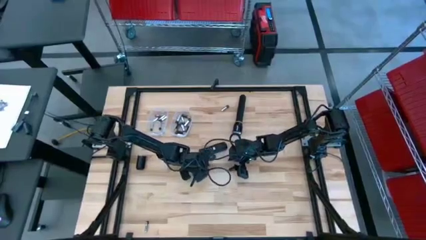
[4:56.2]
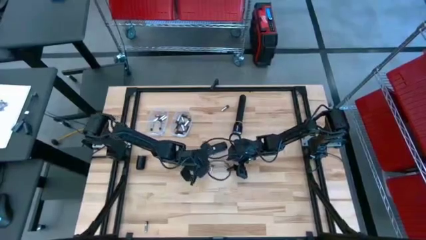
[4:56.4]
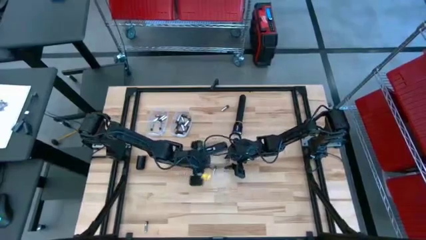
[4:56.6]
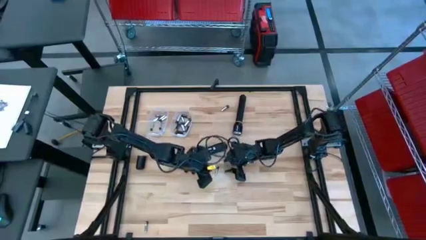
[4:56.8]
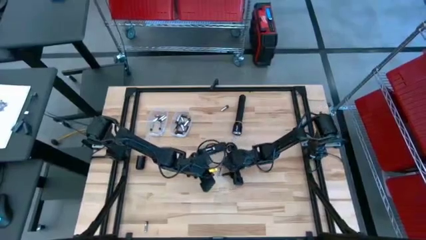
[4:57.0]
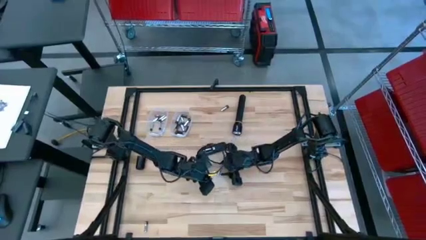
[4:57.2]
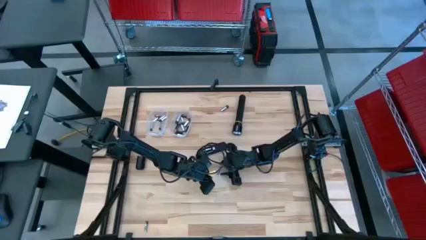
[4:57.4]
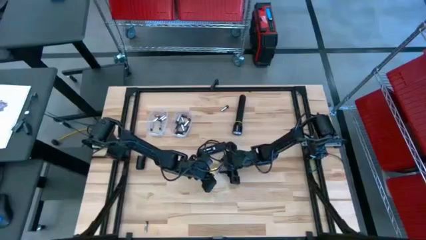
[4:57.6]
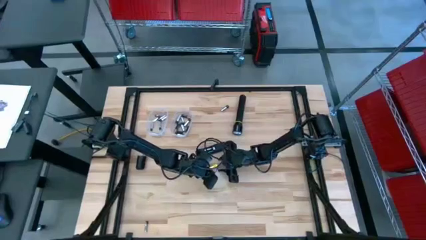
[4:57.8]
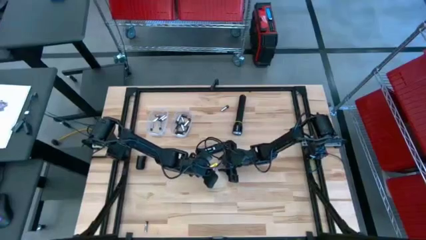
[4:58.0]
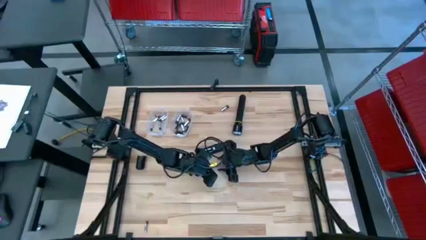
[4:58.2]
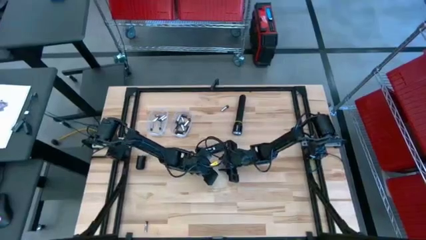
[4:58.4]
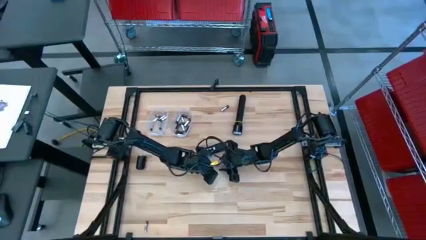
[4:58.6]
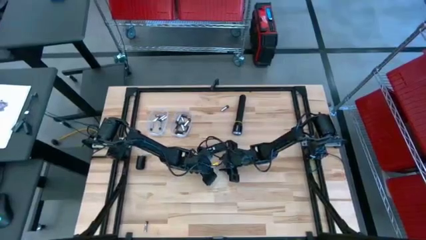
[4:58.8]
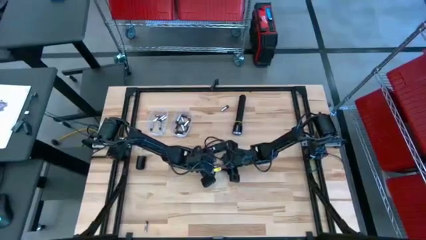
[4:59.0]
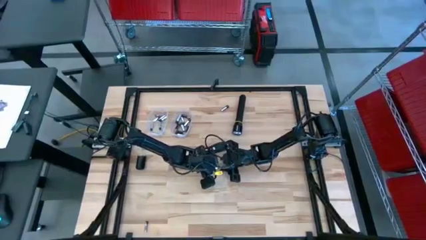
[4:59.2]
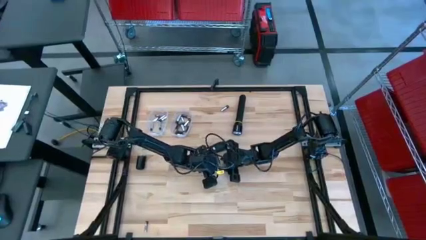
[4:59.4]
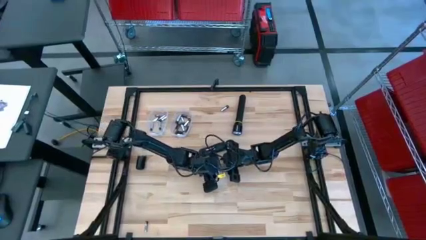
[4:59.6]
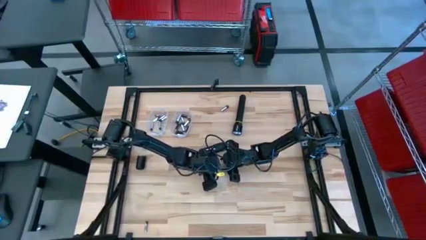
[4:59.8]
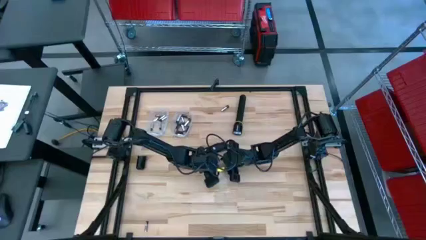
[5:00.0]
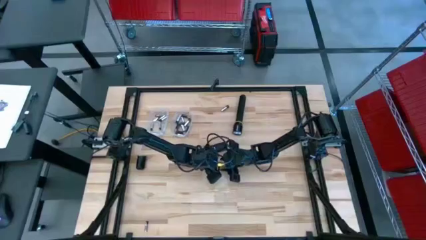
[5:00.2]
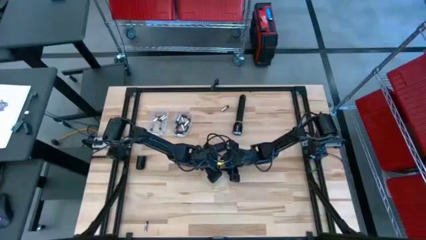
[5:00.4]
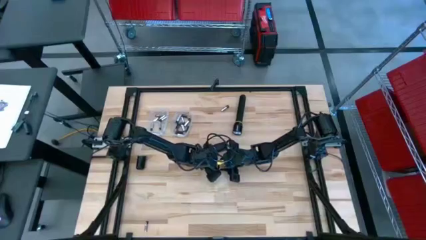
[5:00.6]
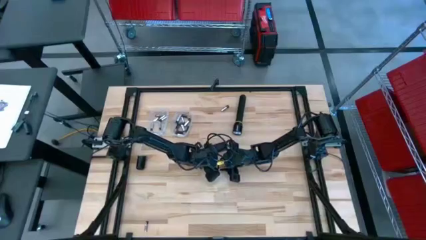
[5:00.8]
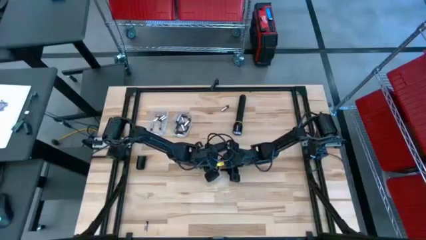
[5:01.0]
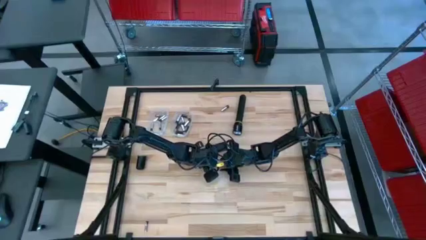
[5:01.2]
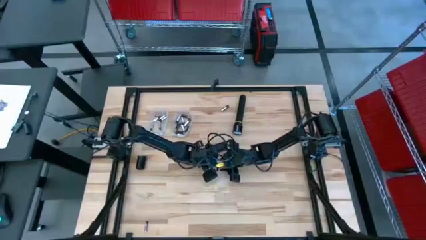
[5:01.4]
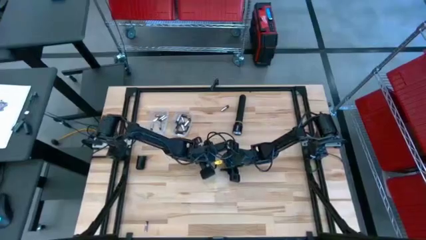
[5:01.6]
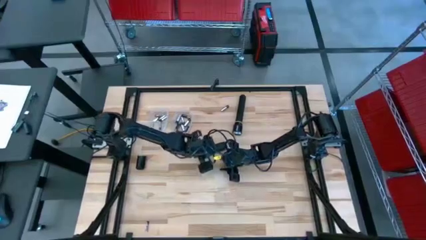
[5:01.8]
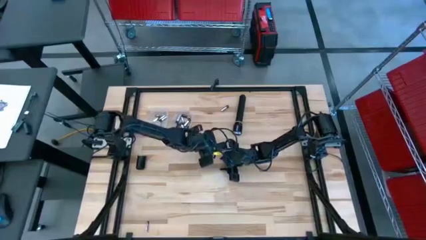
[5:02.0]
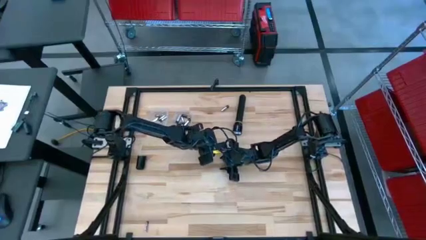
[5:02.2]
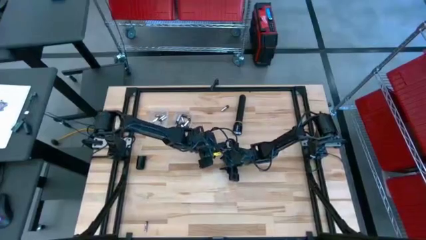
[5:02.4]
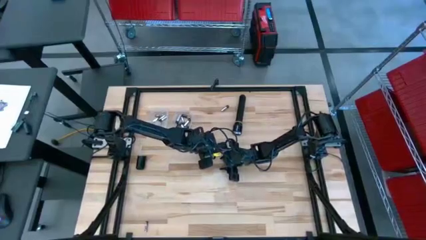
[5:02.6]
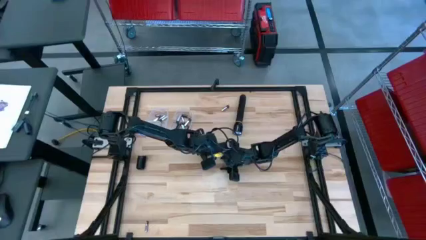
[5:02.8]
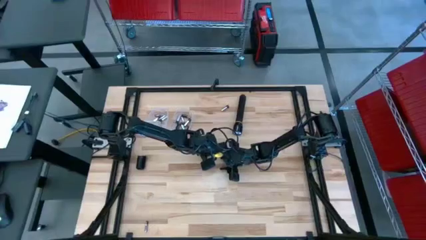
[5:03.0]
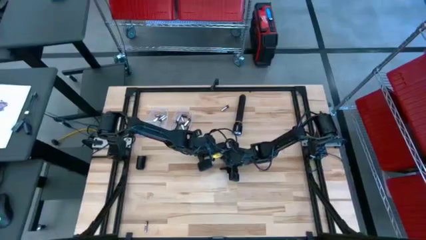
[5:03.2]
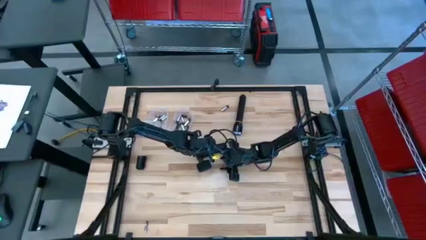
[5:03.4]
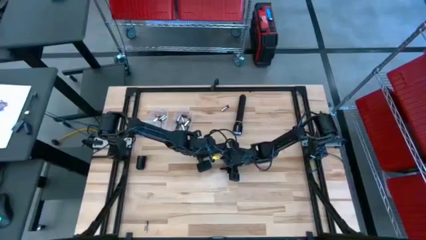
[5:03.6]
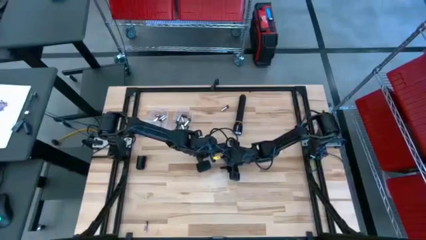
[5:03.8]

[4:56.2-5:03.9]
Task: Insert battery
Insert the silver battery into the remote control battery compartment

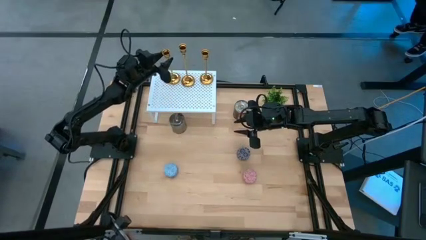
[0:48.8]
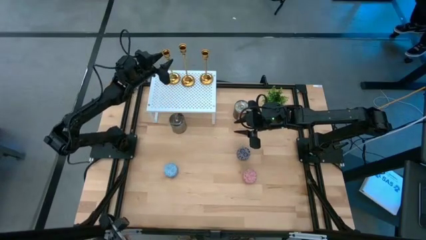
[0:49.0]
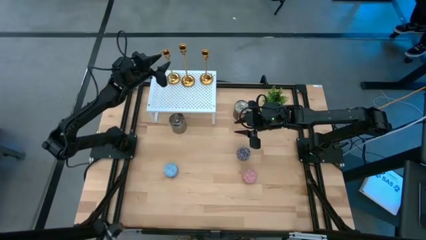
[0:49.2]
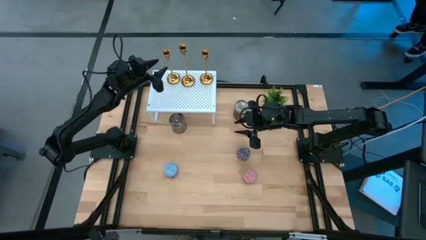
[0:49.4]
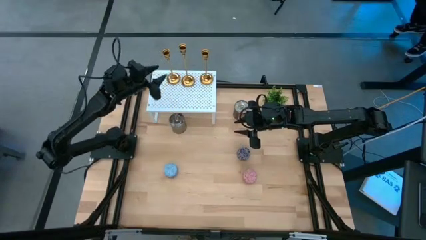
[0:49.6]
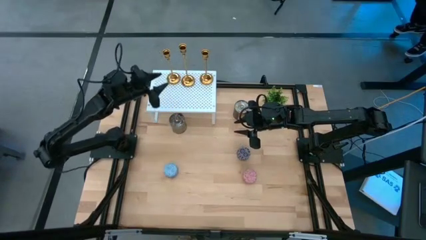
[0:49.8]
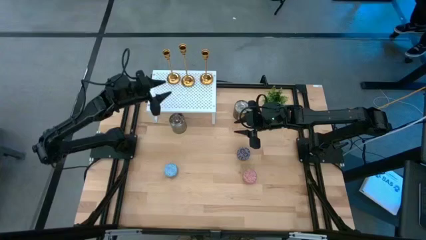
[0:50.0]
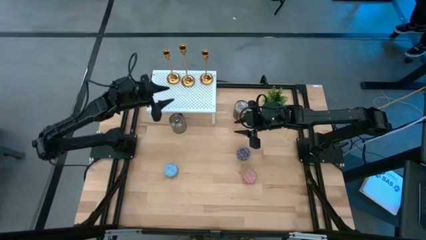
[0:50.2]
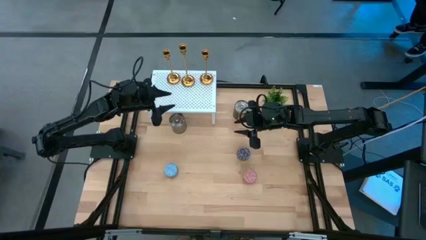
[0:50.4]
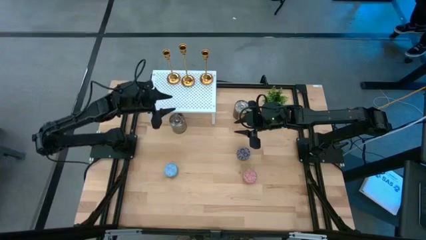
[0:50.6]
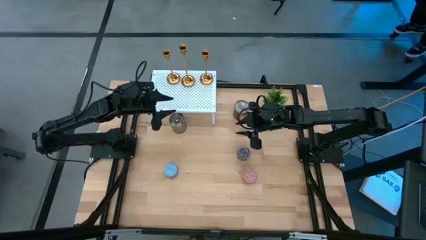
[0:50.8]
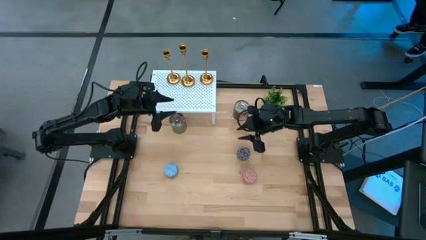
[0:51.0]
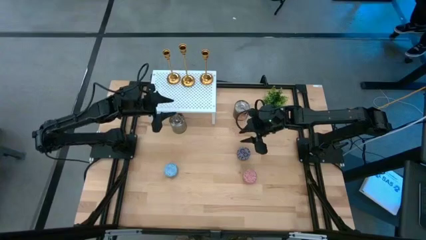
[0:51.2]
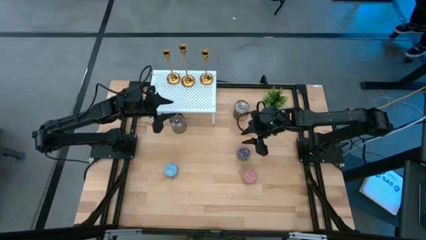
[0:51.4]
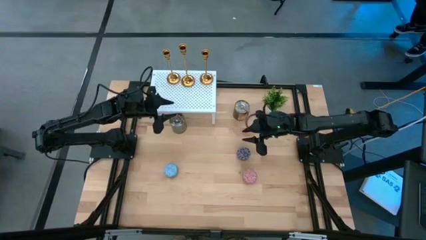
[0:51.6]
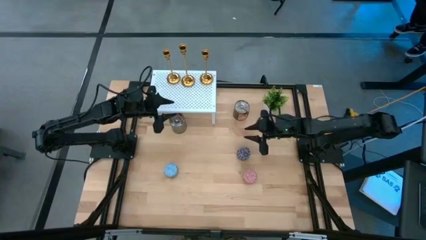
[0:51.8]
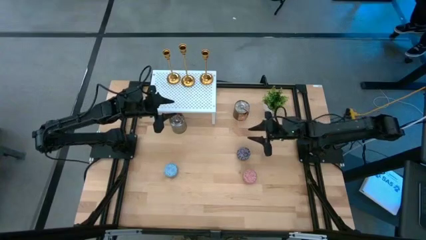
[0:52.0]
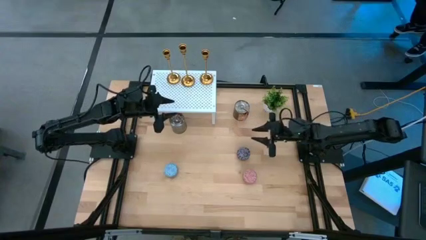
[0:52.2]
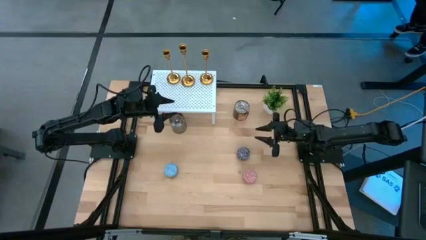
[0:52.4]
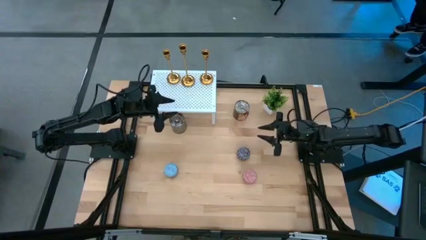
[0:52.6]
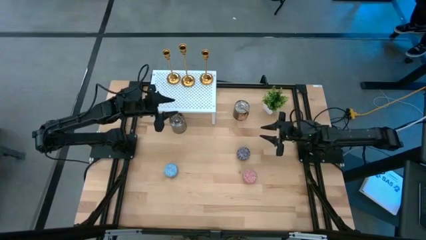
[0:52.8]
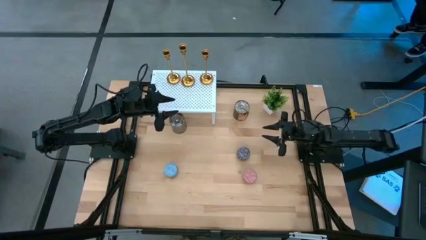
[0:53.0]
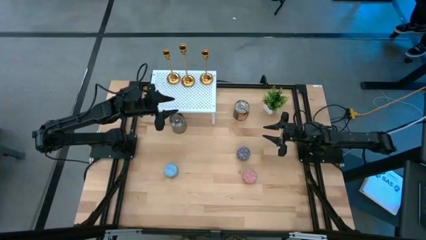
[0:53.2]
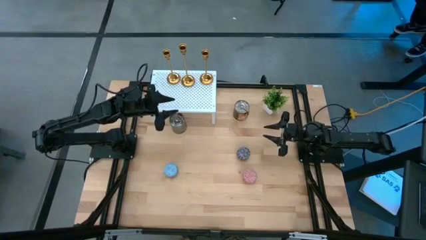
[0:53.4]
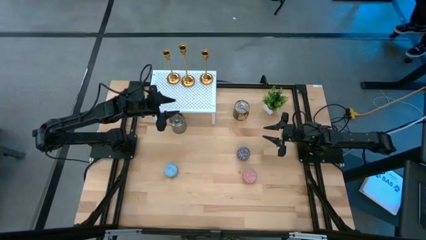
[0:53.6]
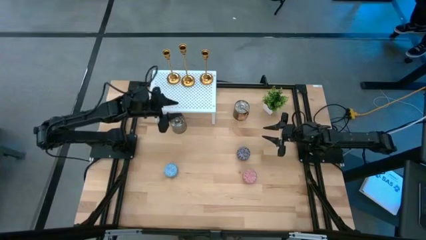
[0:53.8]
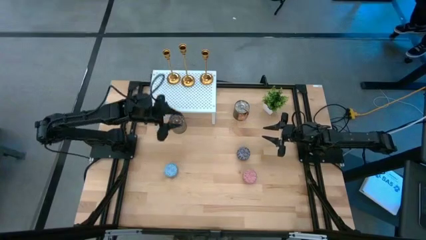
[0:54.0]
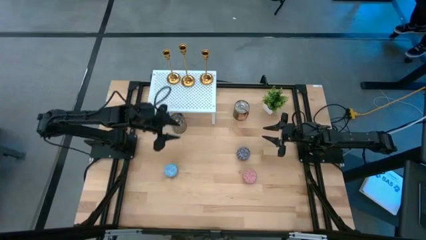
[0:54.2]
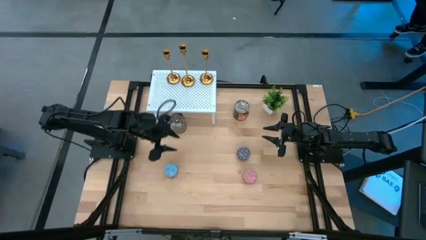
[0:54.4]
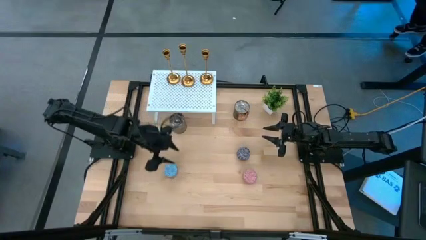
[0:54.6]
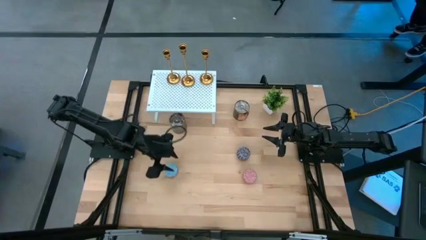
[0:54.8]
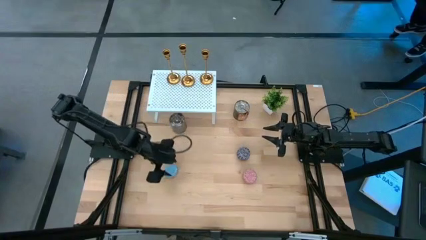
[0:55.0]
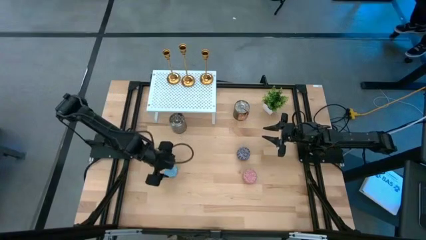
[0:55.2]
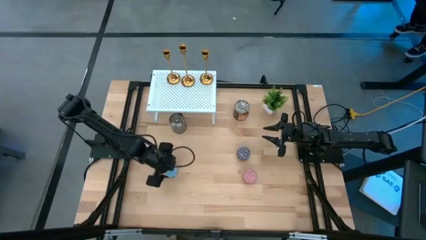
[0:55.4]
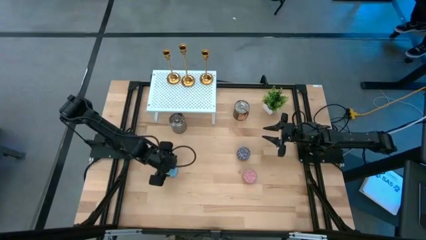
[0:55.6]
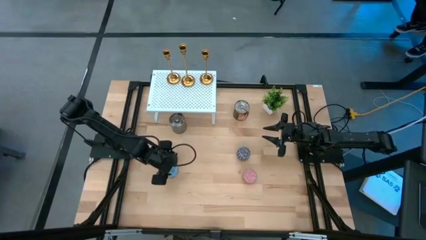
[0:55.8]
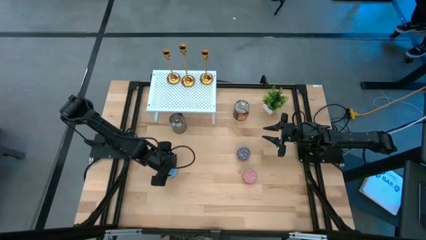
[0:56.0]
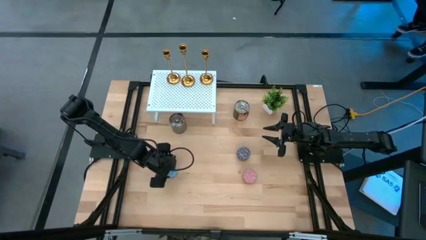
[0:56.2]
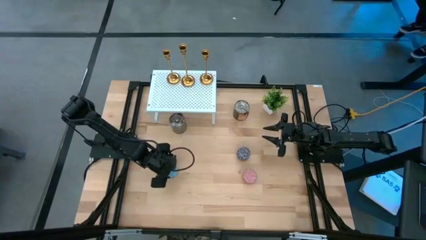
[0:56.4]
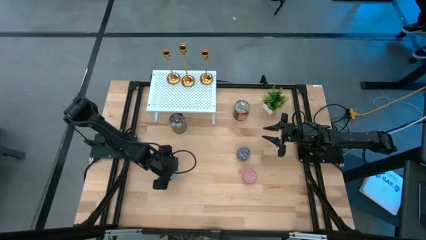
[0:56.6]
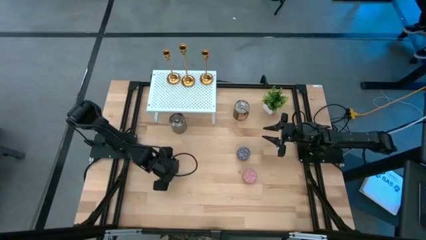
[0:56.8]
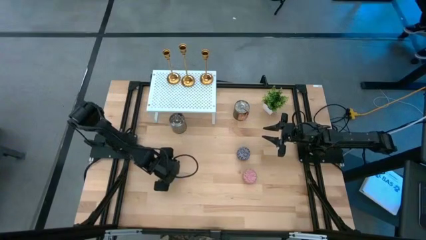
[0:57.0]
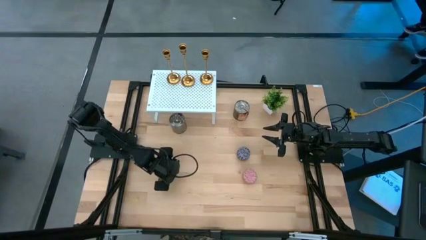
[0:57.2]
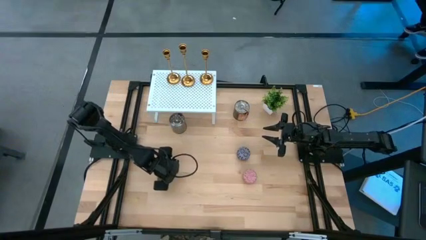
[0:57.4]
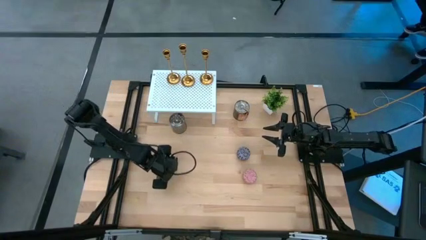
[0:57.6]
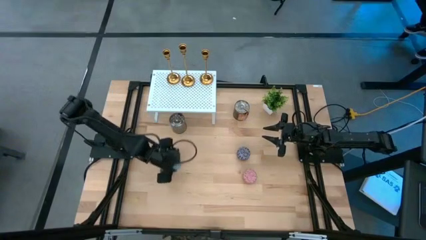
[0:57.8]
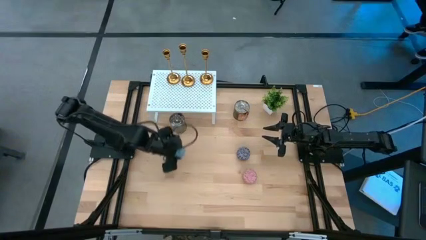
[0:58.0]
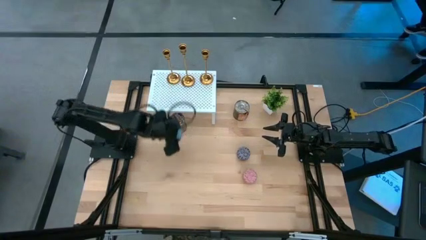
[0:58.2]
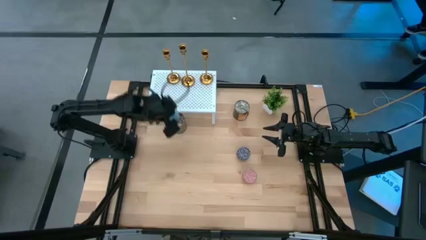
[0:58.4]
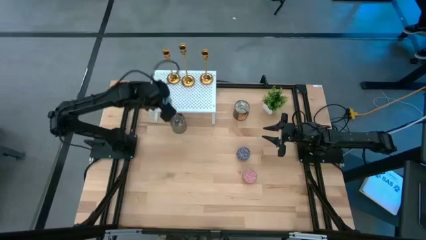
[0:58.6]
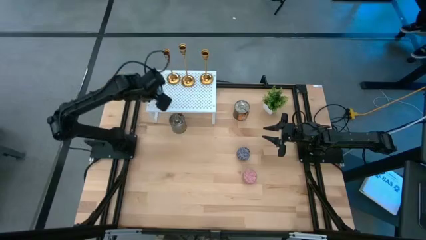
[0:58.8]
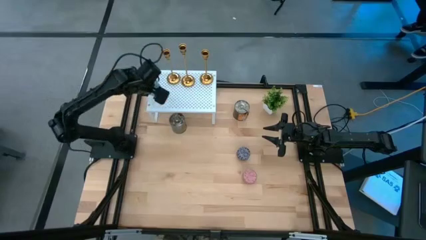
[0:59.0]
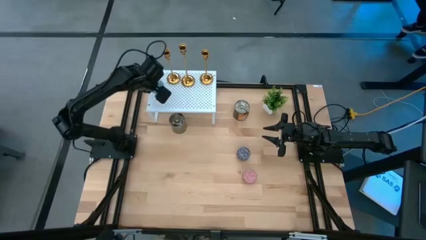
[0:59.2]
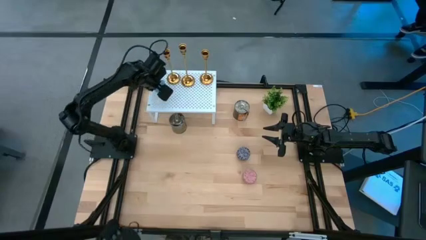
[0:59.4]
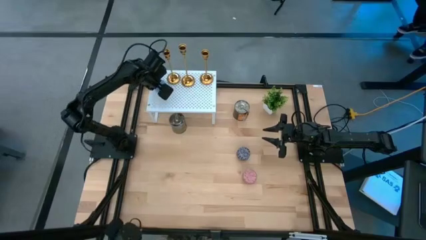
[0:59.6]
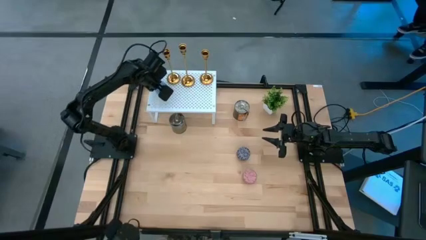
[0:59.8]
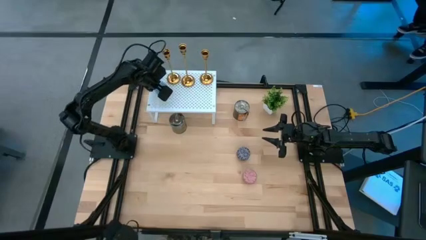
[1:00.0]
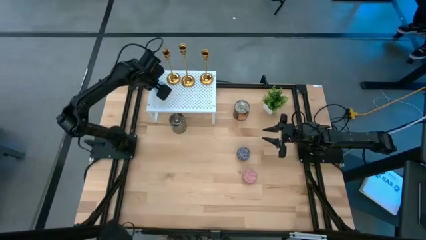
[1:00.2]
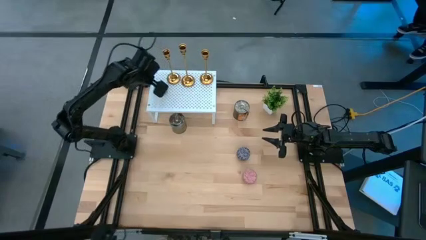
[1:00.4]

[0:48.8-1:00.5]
Task: Pick & Place candle stick holders
Put the blue patterned candle tin on the shelf
